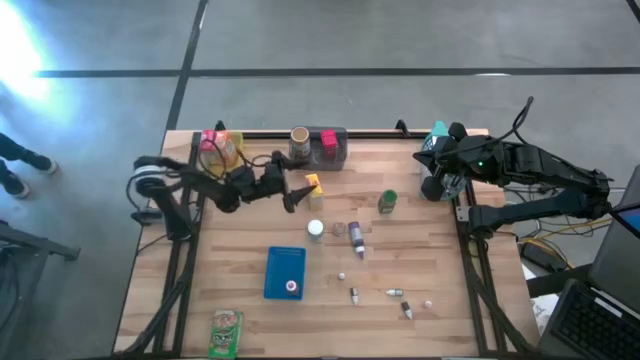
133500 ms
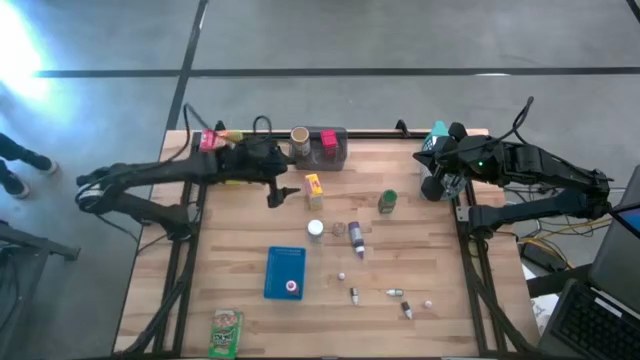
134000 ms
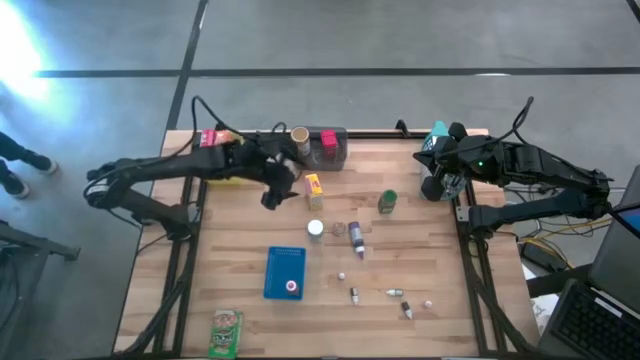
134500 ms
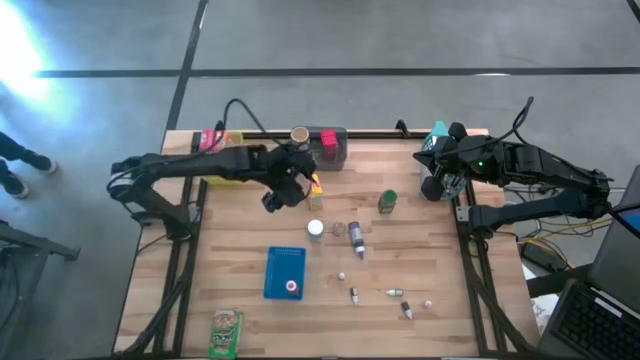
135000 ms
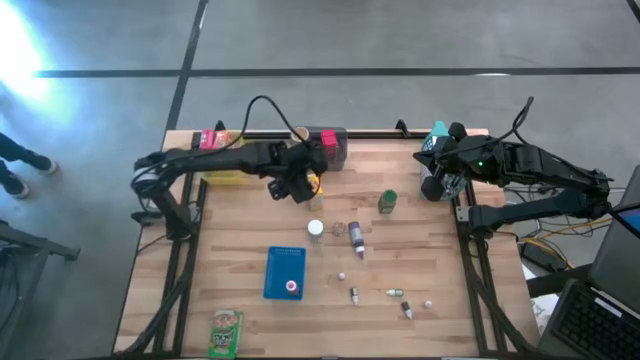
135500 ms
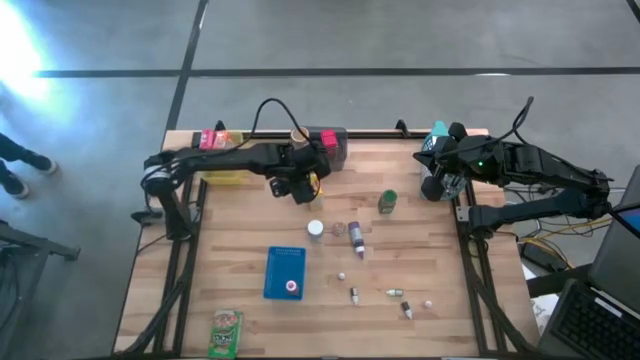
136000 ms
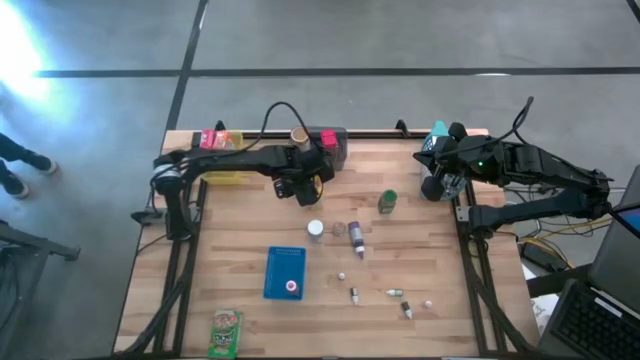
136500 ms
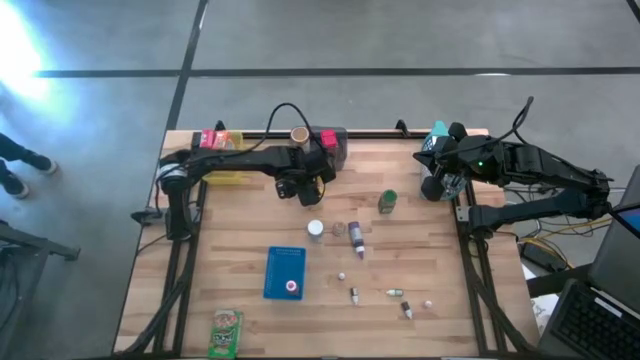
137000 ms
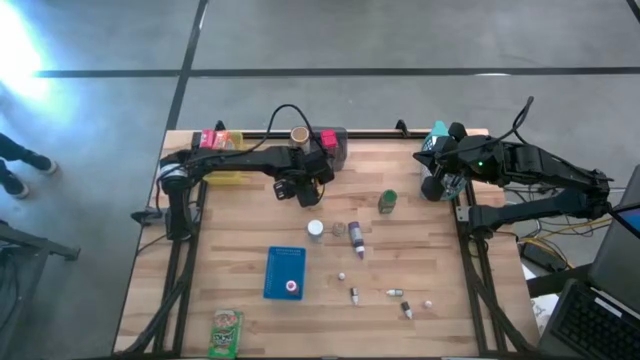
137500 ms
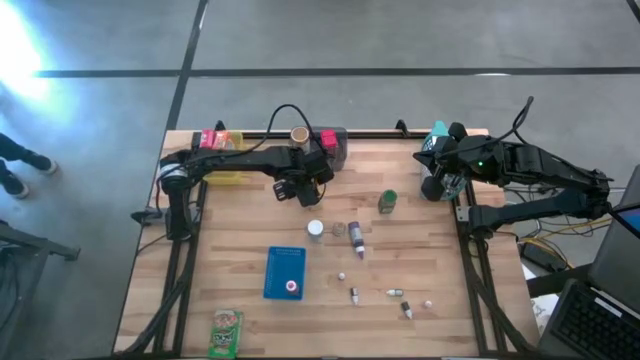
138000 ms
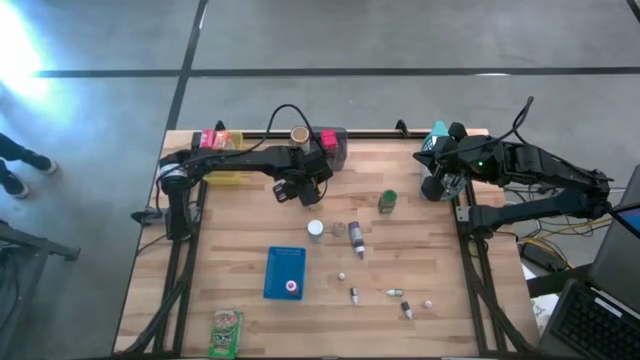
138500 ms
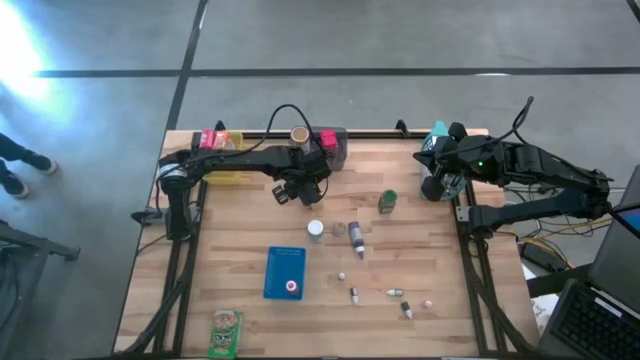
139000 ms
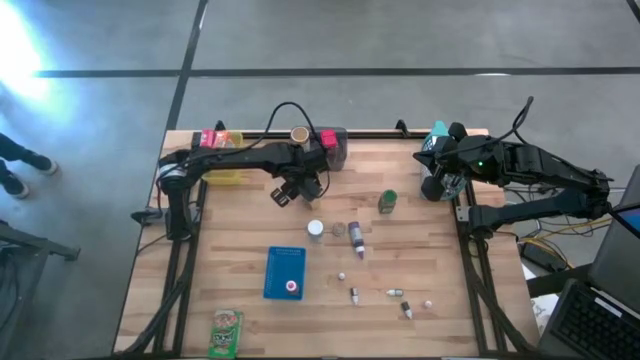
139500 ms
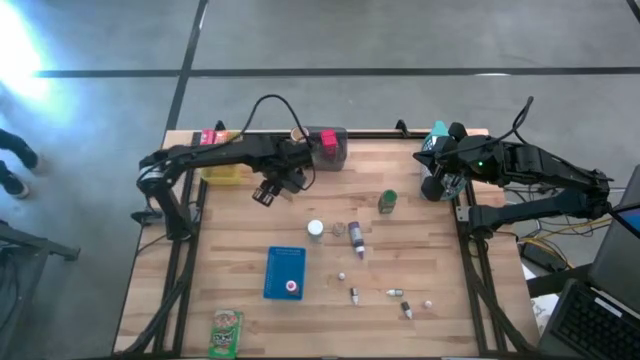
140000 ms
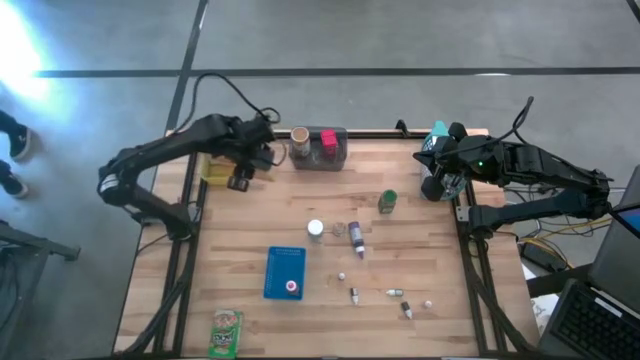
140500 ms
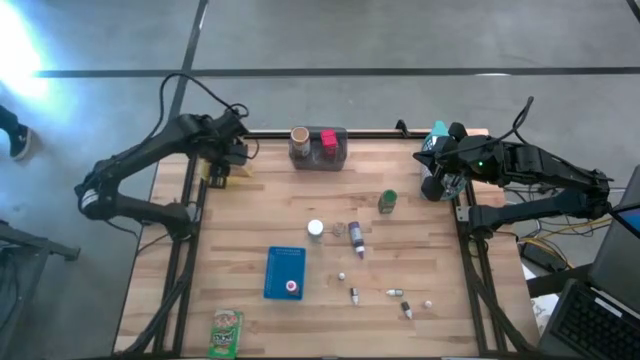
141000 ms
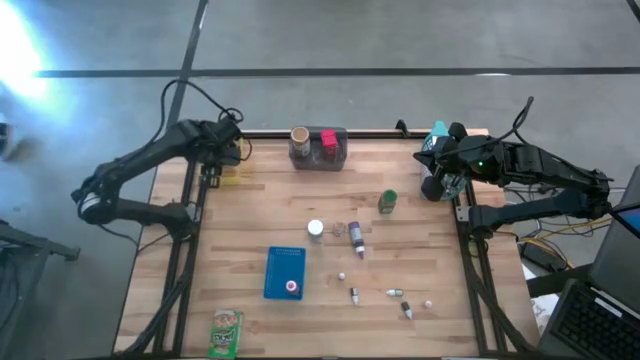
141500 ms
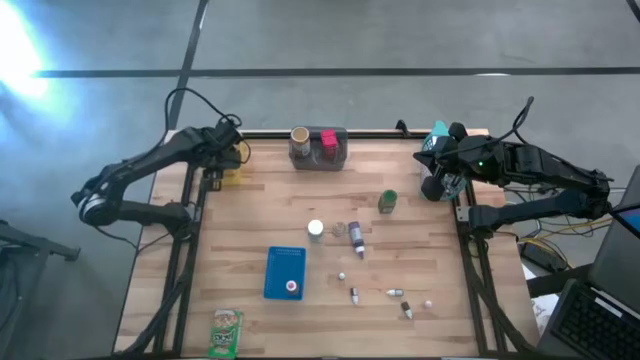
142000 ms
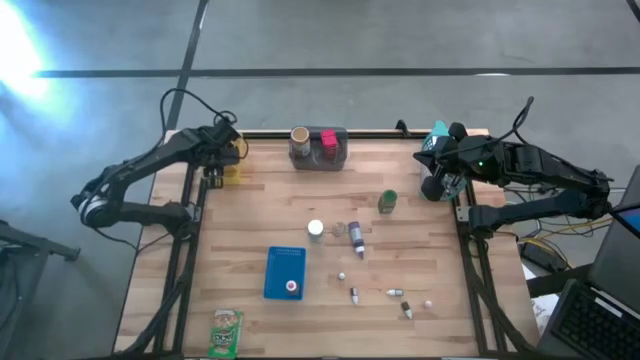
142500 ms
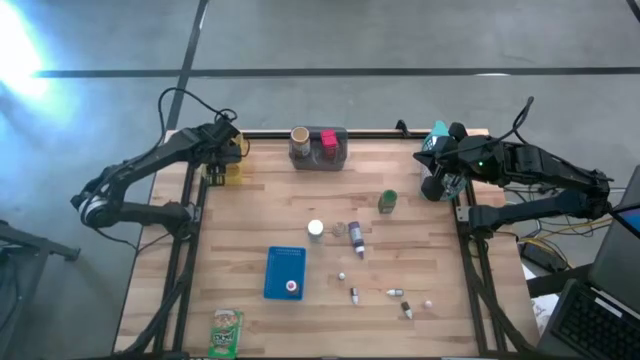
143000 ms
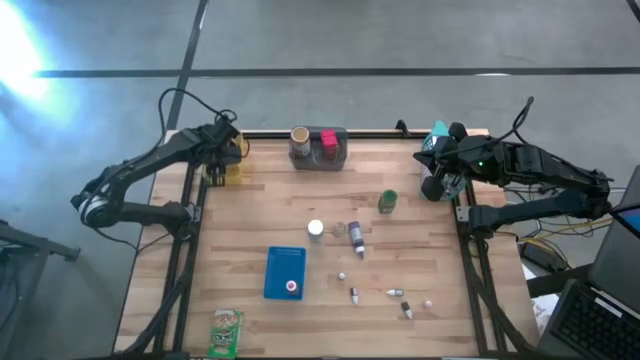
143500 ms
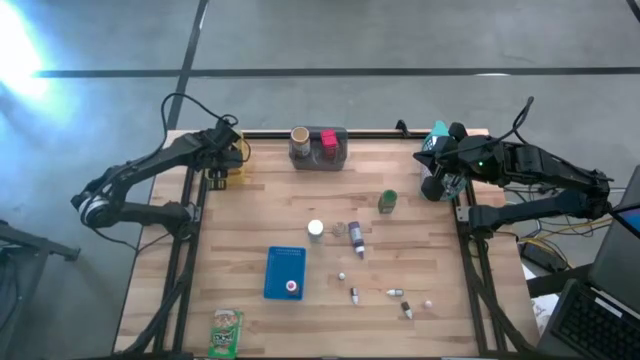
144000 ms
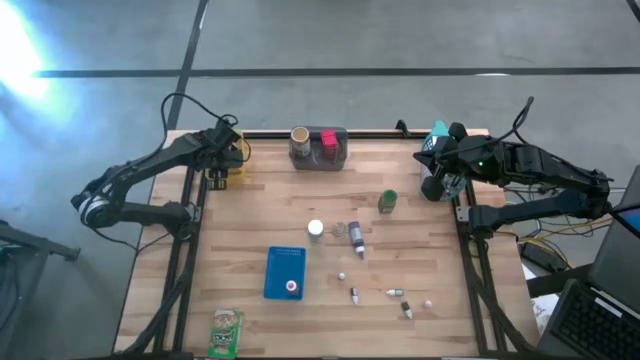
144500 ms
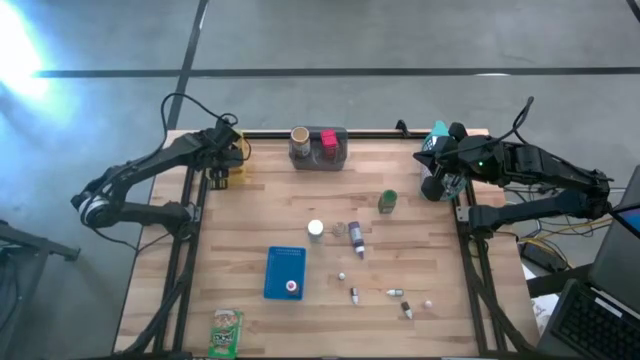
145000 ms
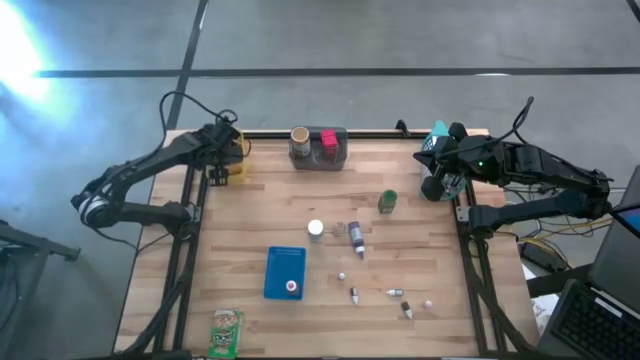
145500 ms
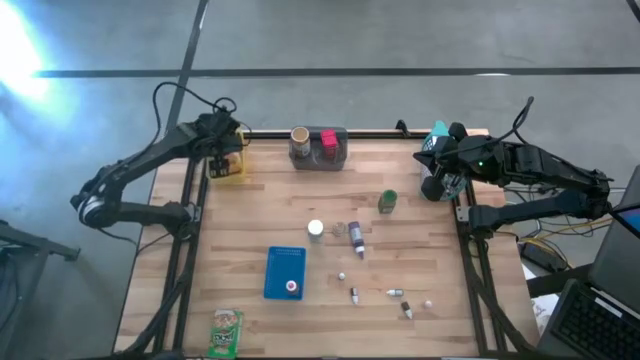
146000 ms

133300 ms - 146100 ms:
Task: Pick & Place Kitchen Items
Put the yellow cereal box into the yellow bin

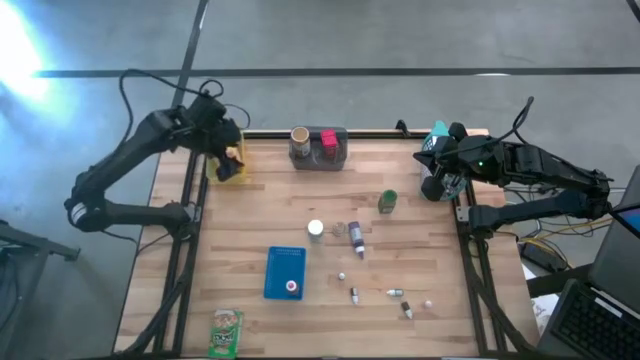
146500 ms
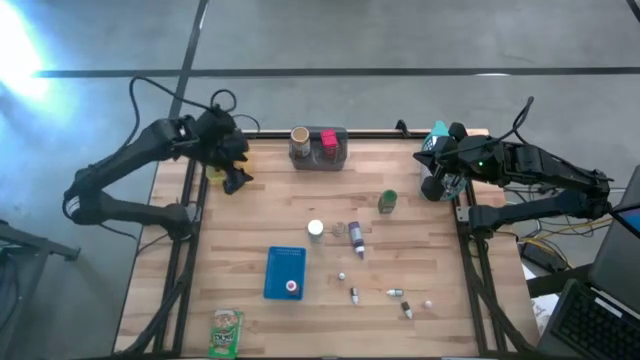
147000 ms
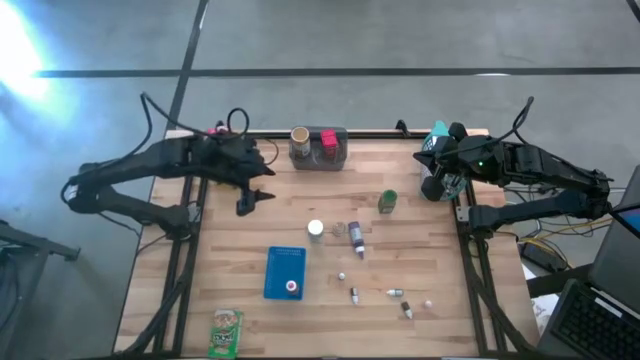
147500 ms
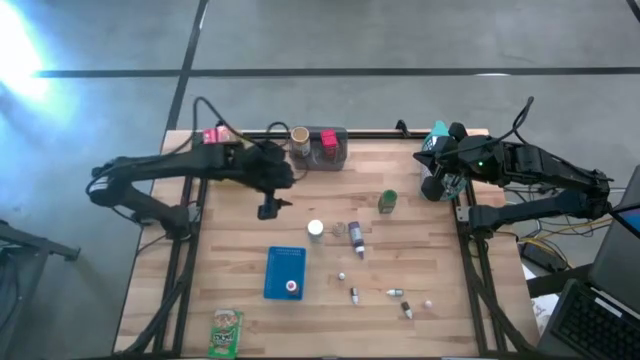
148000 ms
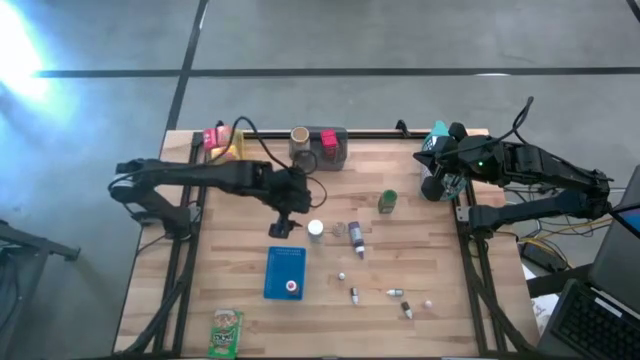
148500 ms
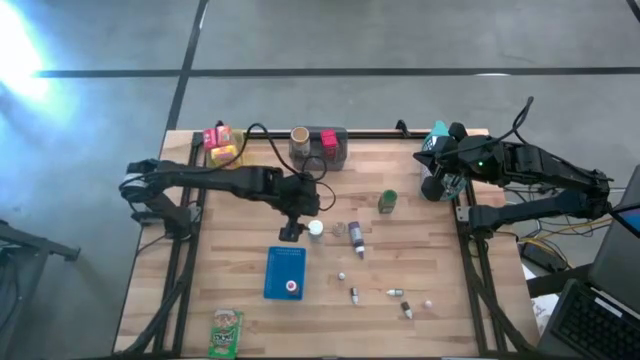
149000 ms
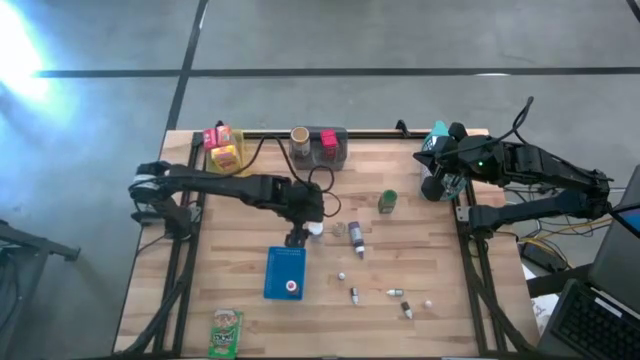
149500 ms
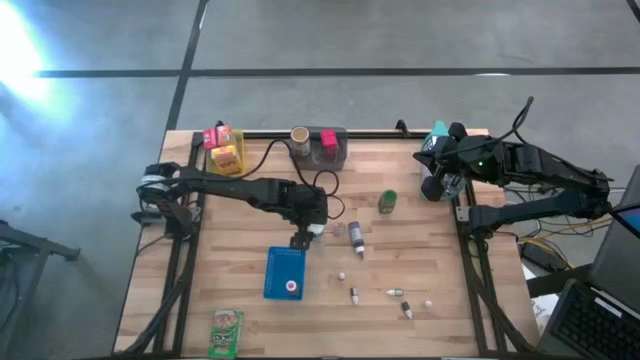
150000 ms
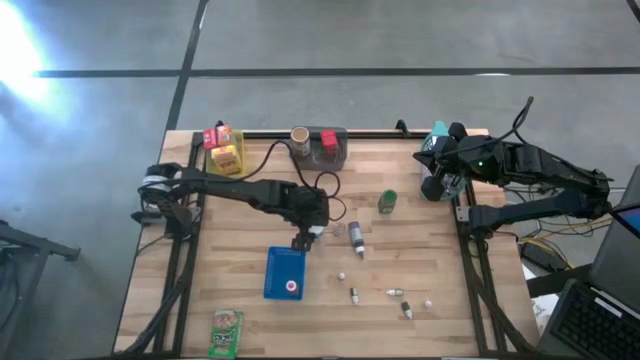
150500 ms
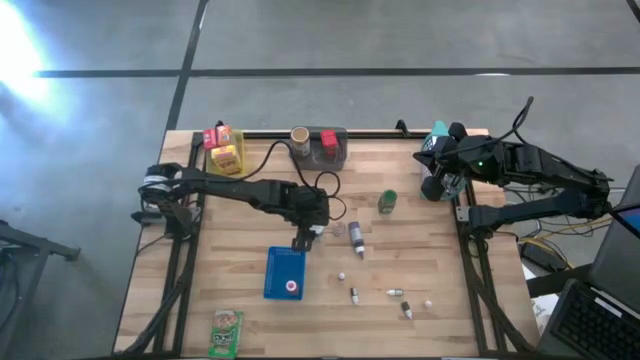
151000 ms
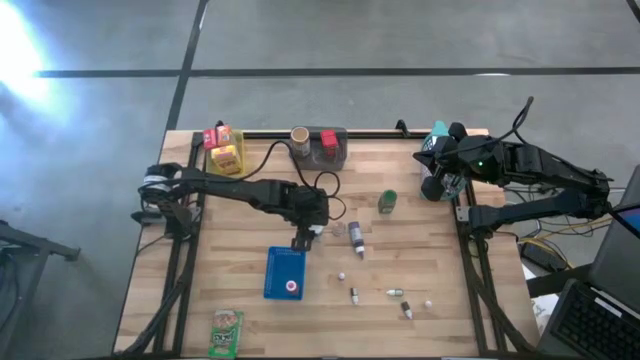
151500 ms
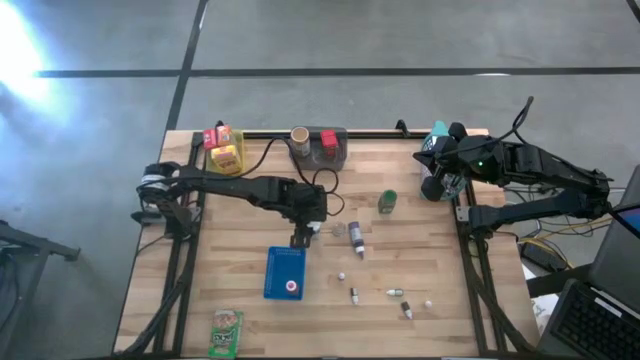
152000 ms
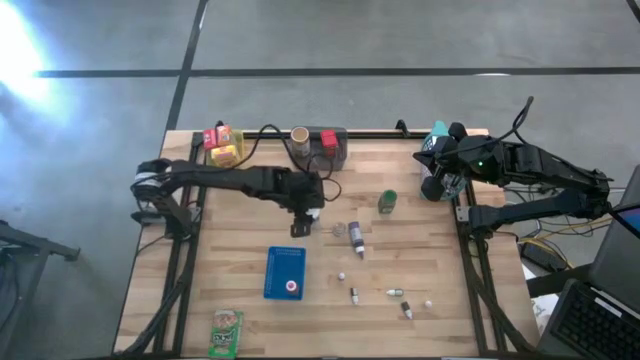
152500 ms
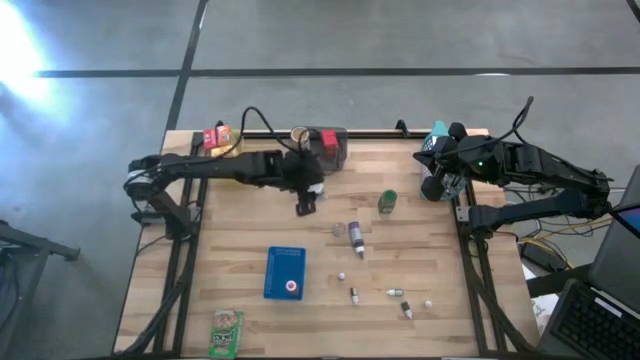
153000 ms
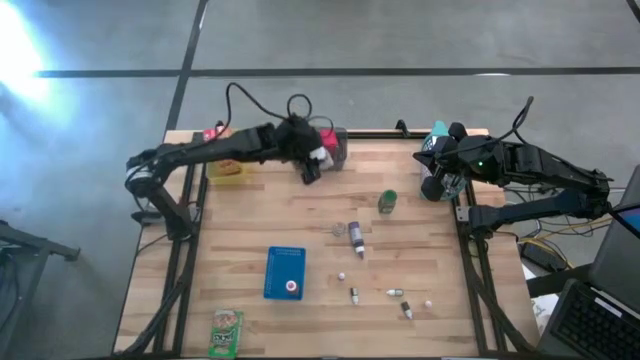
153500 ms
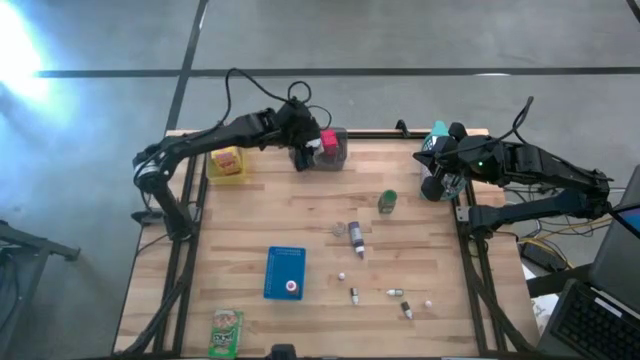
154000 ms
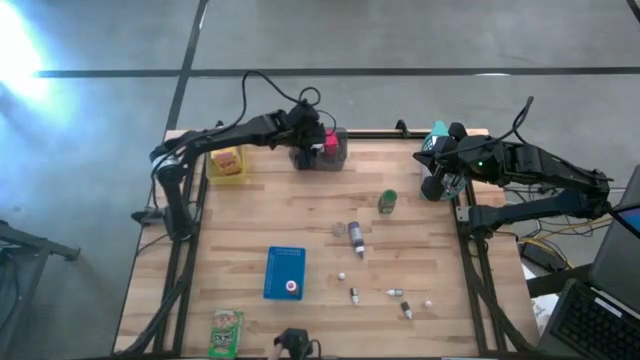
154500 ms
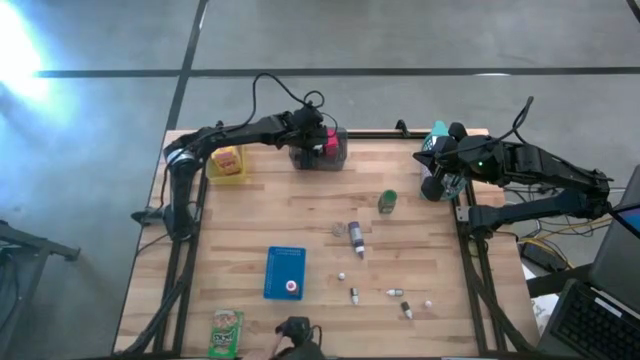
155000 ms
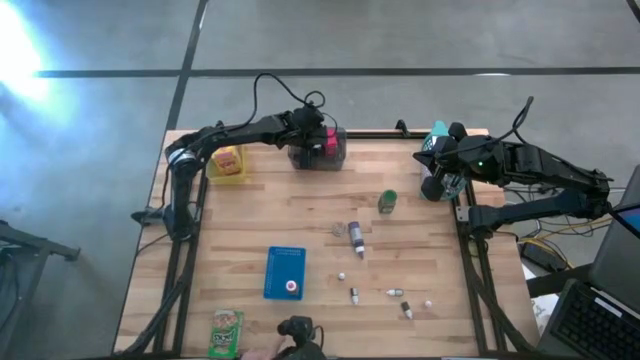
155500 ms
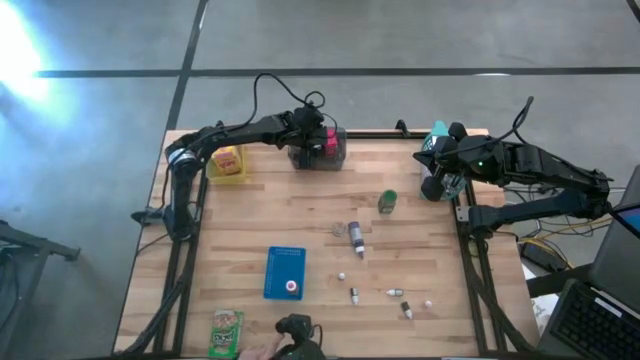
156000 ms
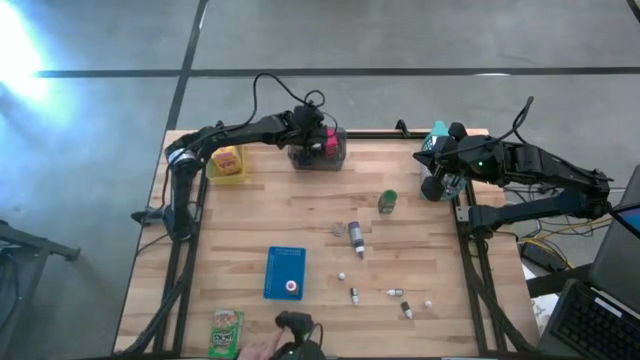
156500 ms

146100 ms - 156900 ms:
Put the white spice bottle into the black bin
